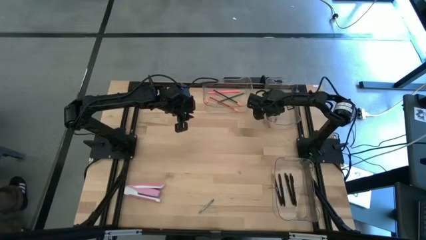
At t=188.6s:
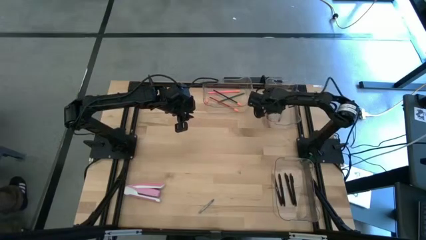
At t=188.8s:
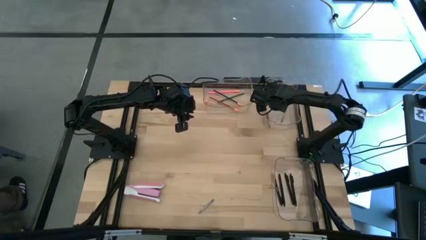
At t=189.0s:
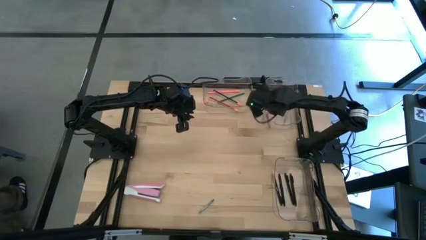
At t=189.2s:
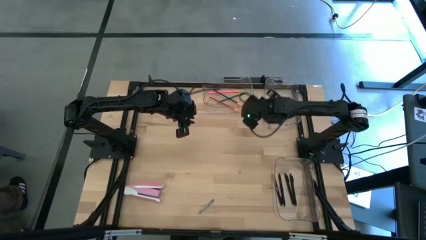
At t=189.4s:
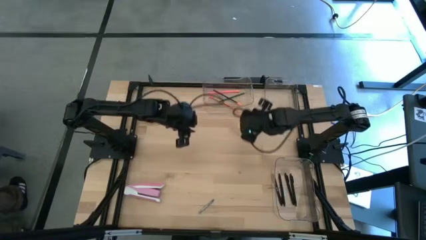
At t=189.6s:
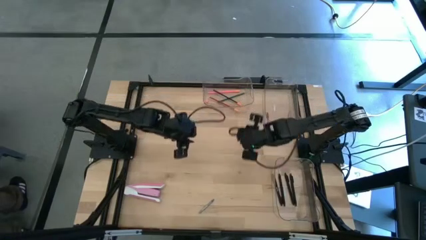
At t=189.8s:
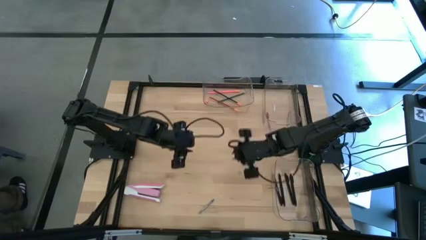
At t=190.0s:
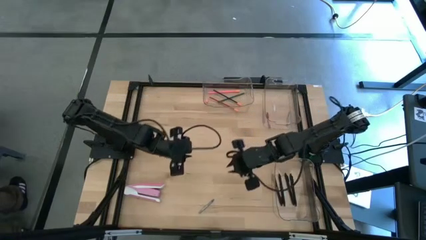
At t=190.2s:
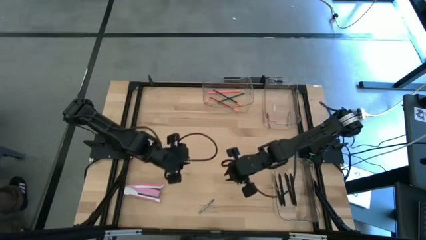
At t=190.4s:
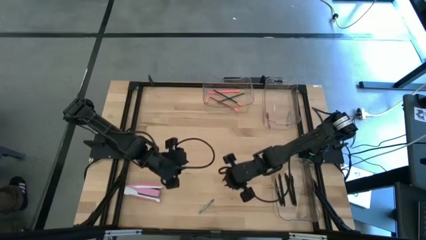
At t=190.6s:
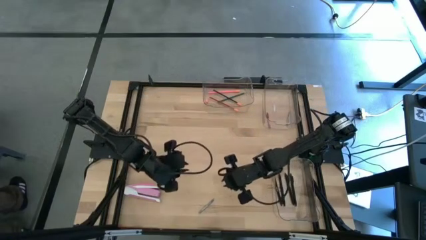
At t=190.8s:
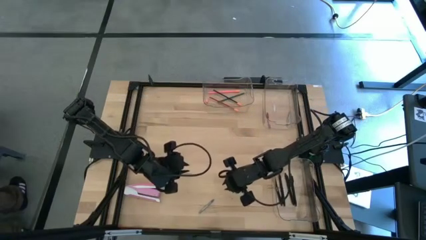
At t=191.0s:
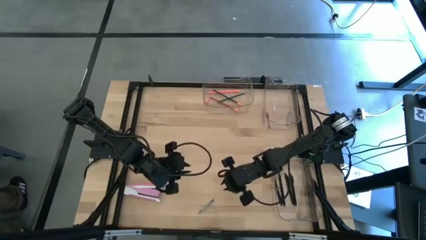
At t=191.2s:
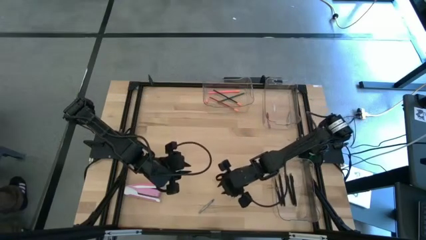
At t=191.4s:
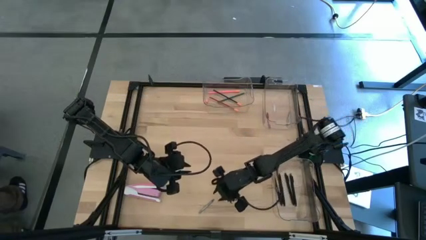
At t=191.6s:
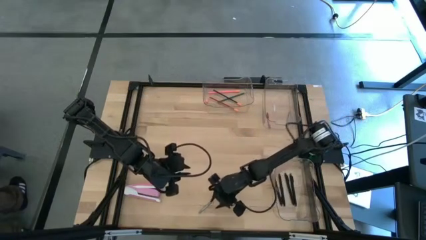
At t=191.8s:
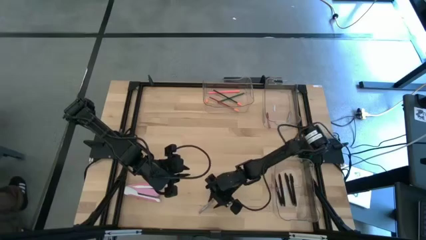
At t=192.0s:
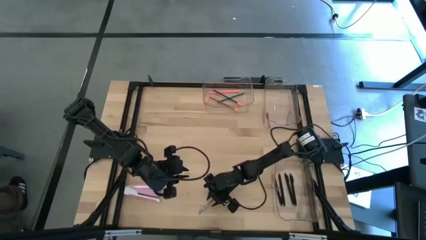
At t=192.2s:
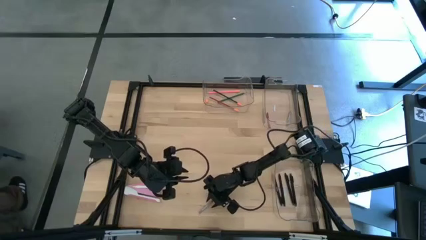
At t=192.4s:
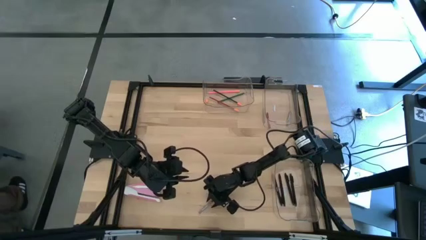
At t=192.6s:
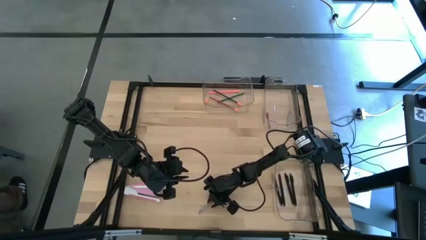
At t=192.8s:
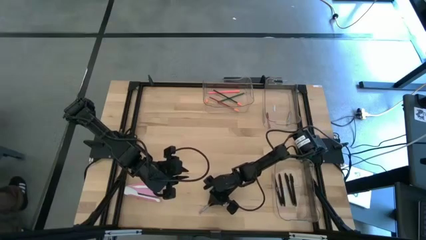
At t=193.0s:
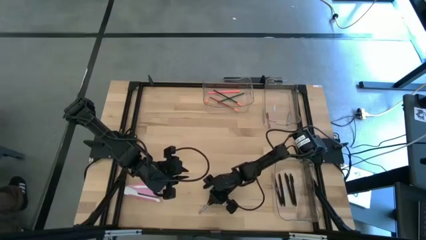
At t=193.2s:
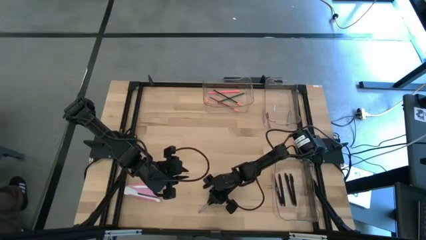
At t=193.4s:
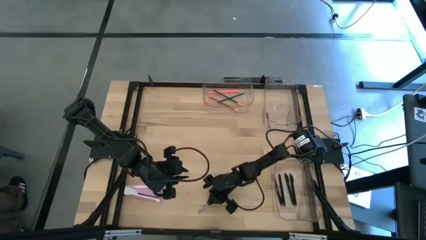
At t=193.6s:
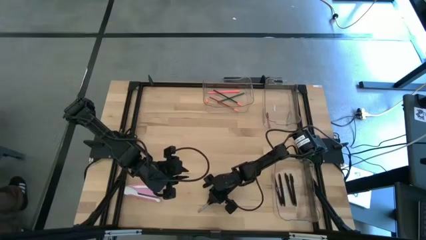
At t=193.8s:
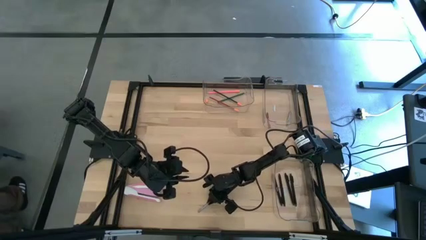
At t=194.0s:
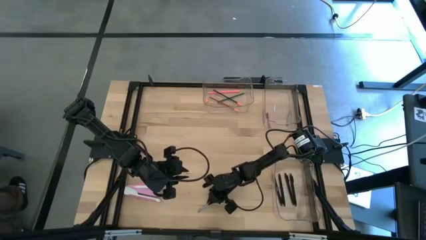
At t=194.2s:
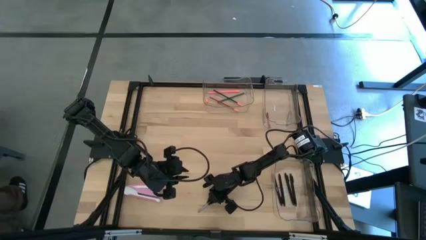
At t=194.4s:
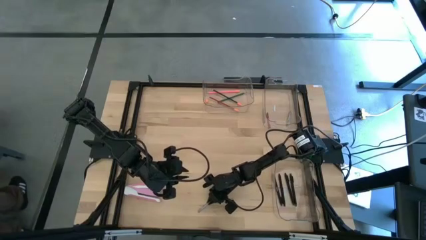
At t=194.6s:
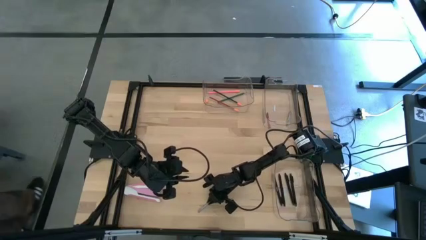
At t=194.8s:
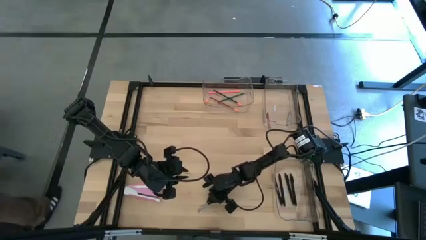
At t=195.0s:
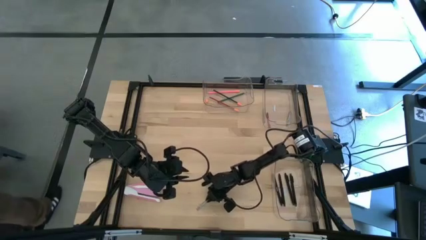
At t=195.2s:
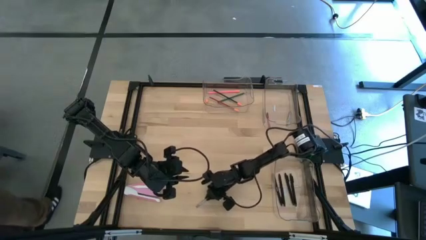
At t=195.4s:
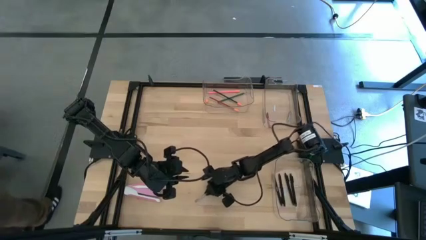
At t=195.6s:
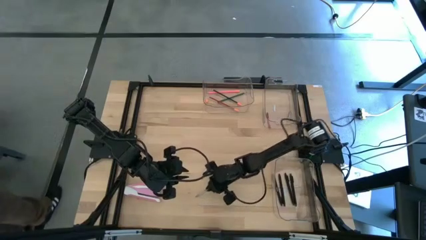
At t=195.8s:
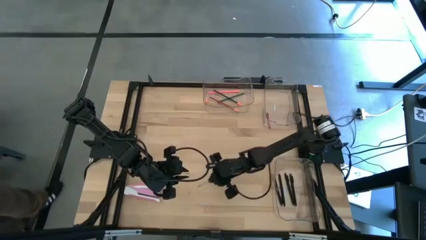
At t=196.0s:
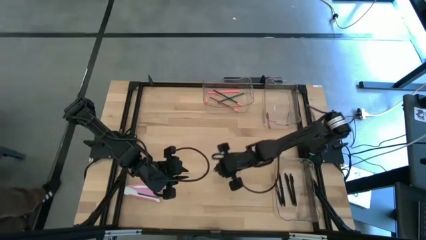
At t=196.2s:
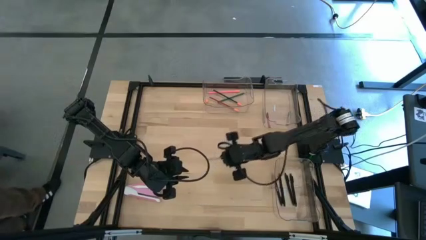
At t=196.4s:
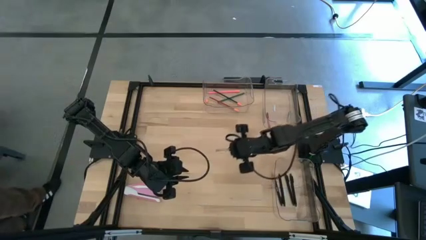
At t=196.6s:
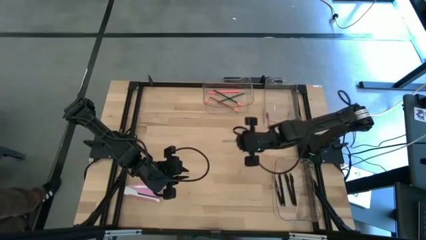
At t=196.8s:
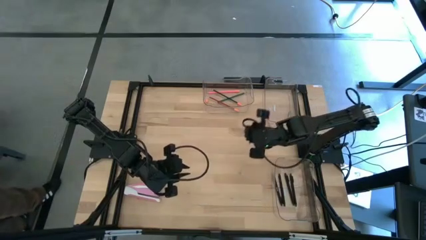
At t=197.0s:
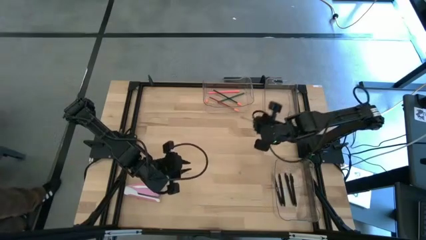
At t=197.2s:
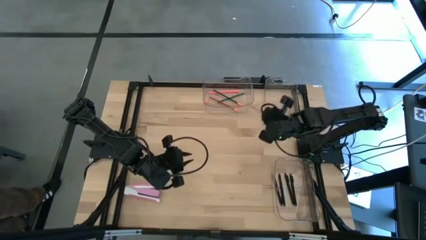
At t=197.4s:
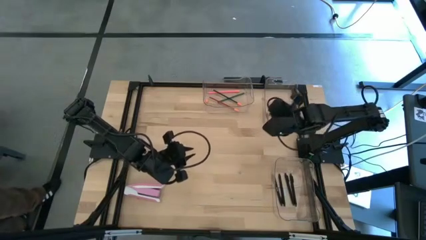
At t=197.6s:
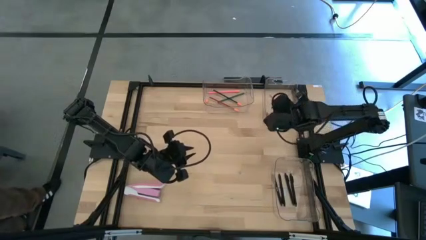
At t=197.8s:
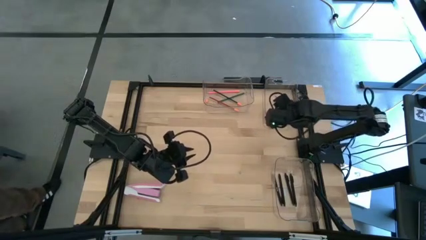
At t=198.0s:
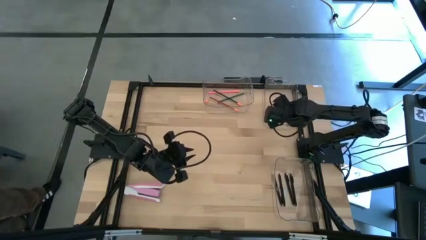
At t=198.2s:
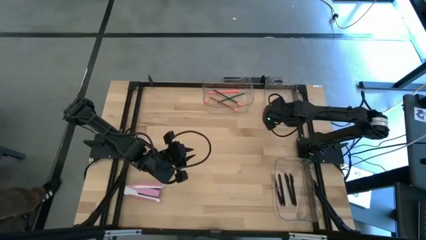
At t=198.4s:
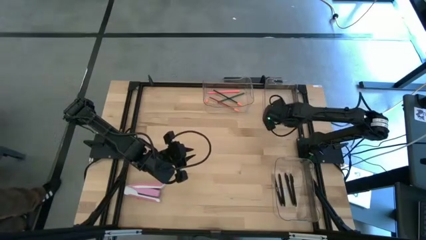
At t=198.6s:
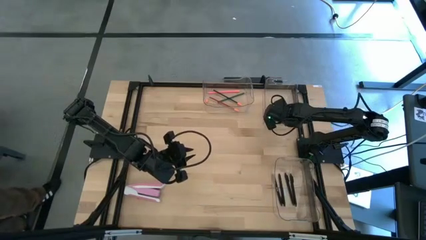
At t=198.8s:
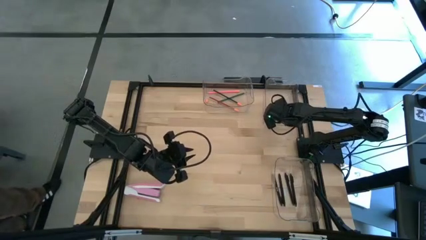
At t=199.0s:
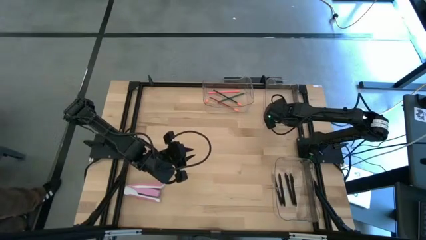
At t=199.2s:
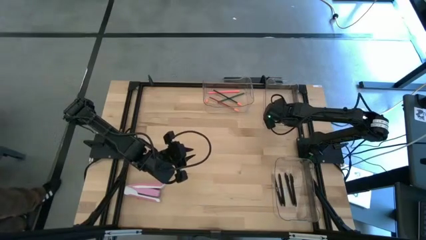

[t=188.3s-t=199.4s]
Task: Sort crayons/erasers/pens/pencils in bins
Put the gray crayon into the top right transparent bin

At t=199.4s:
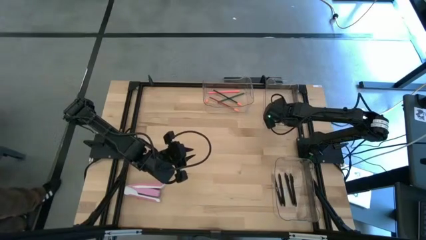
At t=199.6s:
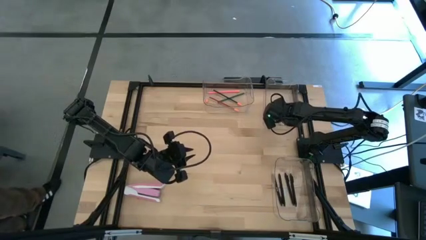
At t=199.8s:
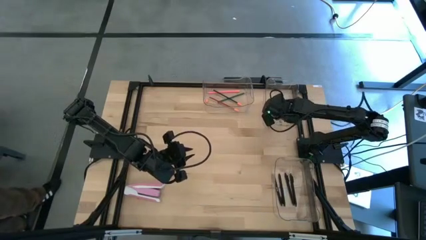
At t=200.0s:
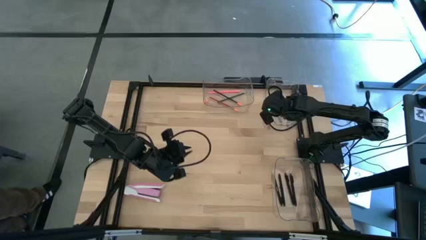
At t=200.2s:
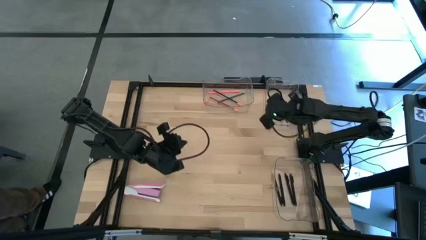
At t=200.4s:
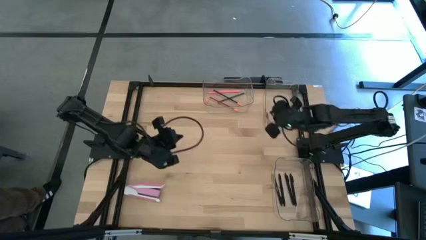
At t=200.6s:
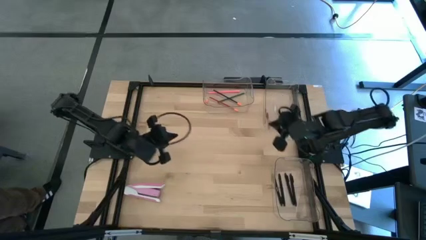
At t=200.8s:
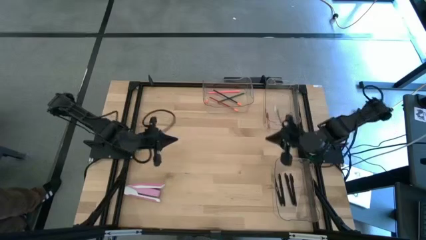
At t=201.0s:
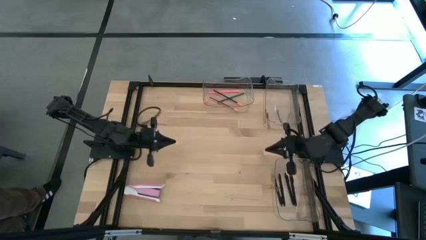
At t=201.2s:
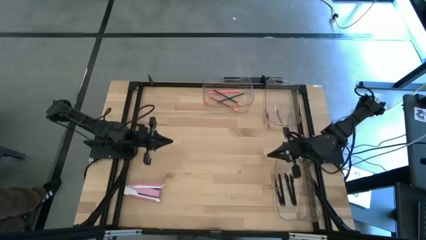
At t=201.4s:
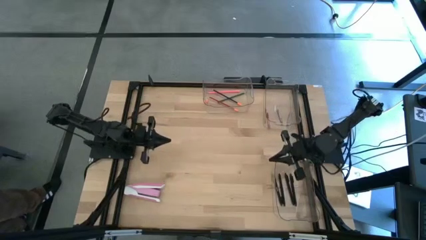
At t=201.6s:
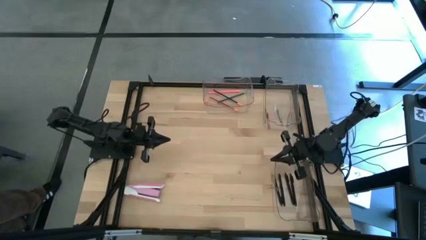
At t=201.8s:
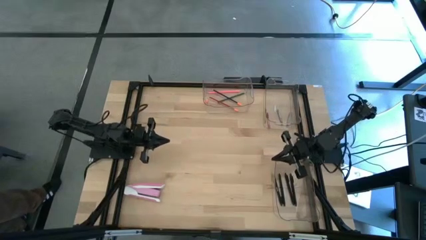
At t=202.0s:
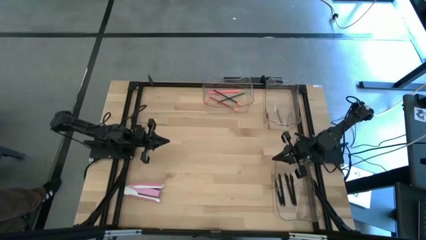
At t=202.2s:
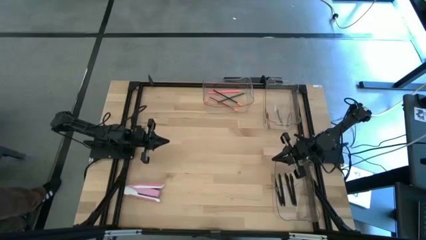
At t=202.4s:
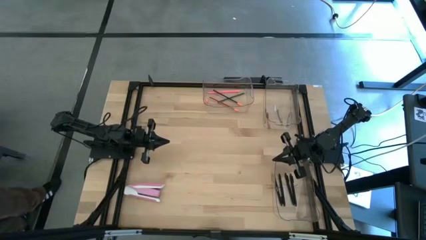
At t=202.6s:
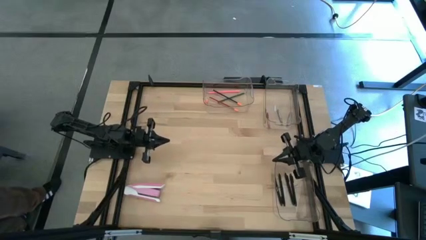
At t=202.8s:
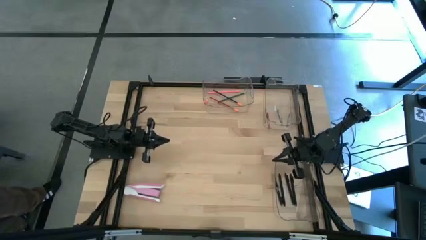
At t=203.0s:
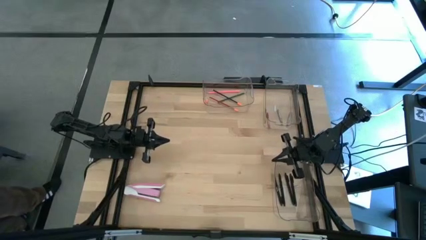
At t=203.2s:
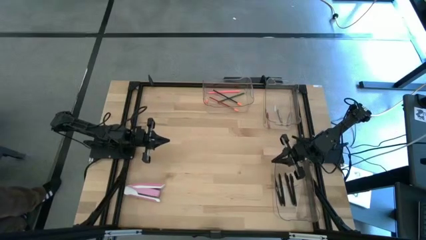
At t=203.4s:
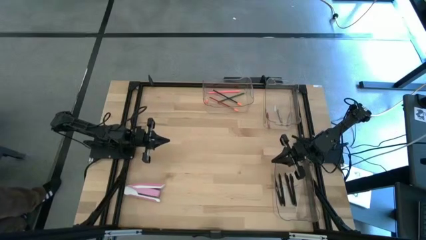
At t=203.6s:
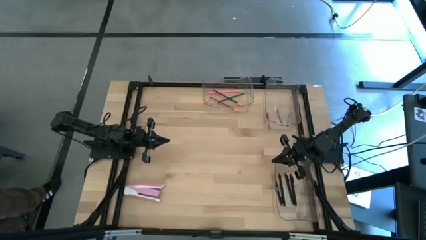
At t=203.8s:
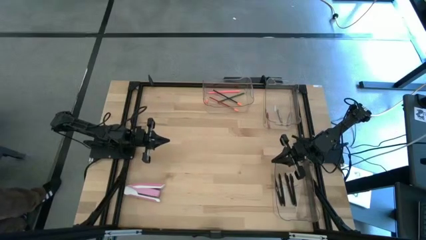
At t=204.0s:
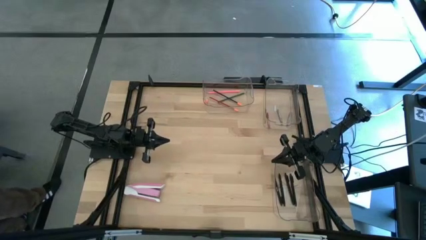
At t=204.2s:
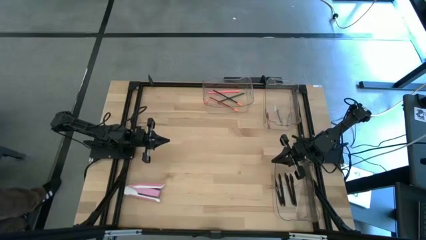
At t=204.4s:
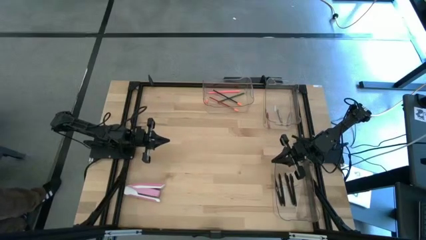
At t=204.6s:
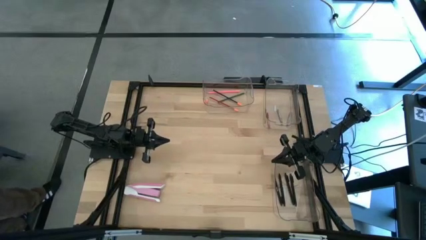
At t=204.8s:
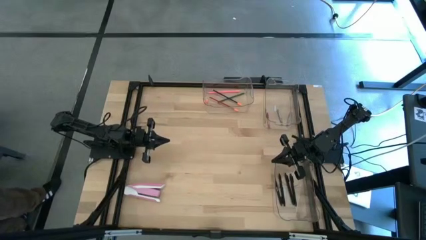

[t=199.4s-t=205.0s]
Return to Home Position
